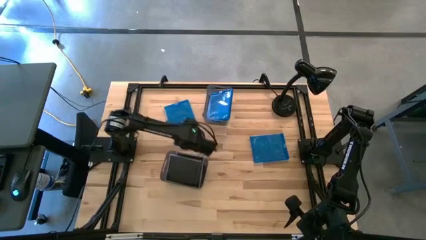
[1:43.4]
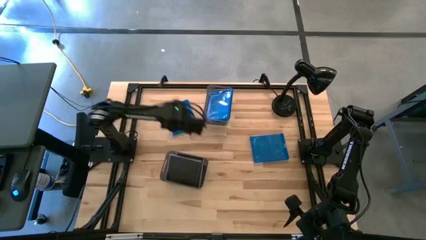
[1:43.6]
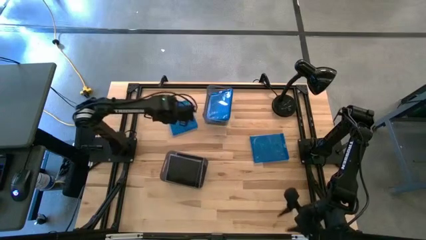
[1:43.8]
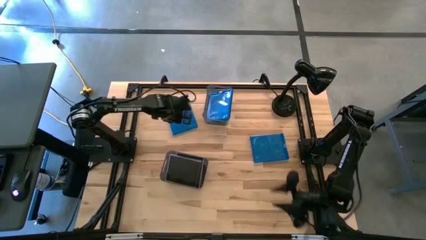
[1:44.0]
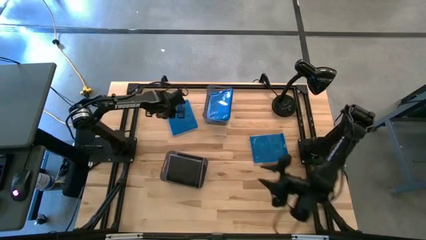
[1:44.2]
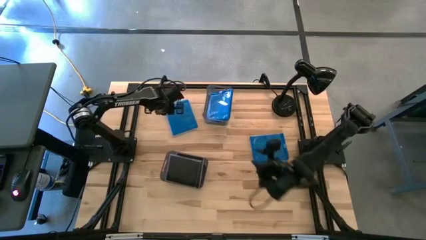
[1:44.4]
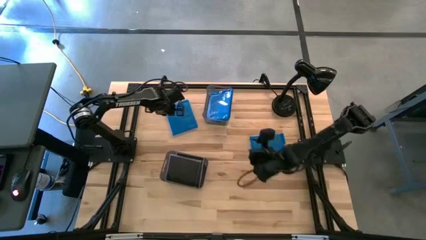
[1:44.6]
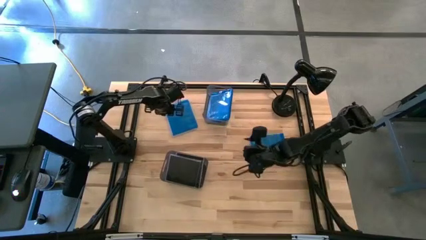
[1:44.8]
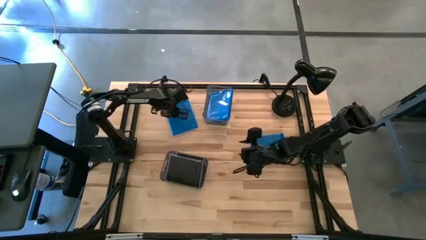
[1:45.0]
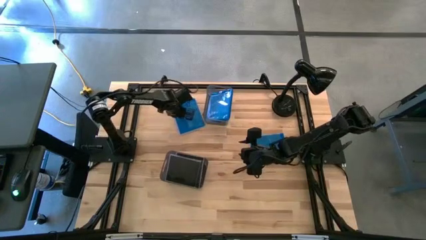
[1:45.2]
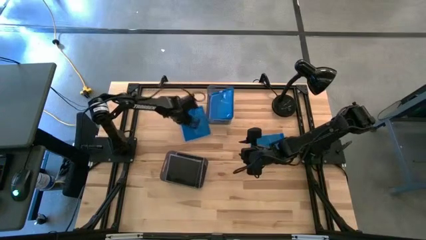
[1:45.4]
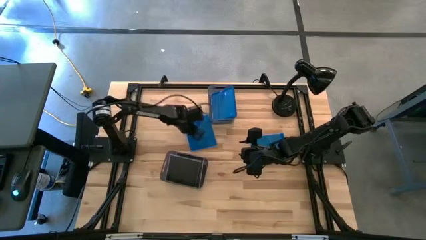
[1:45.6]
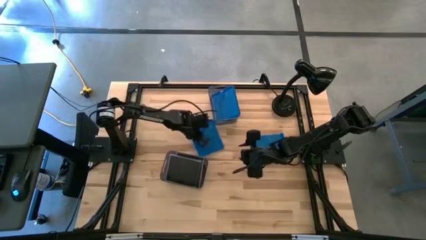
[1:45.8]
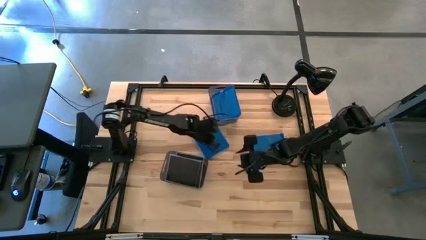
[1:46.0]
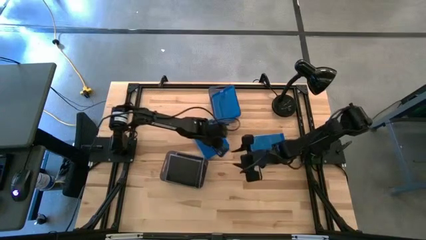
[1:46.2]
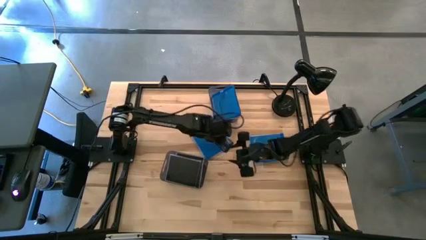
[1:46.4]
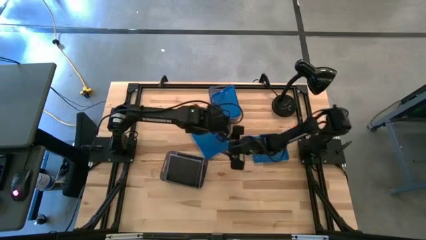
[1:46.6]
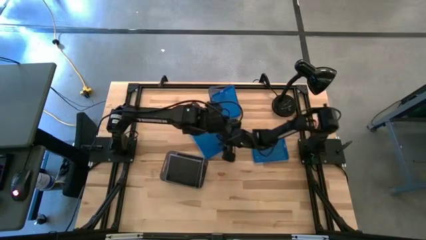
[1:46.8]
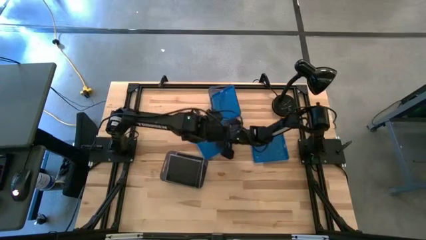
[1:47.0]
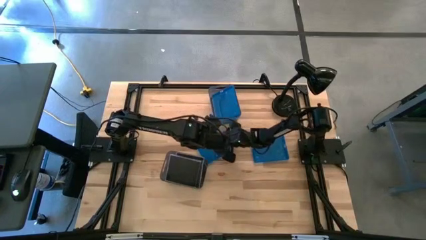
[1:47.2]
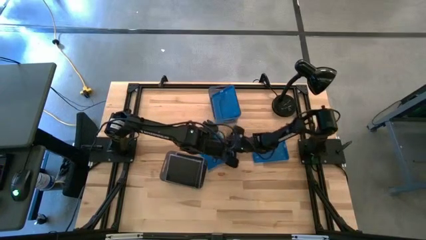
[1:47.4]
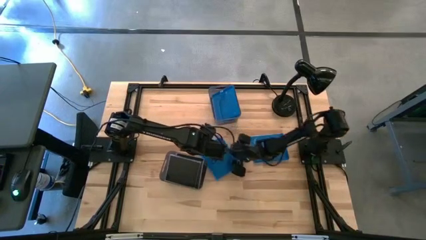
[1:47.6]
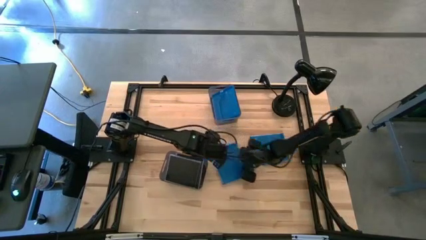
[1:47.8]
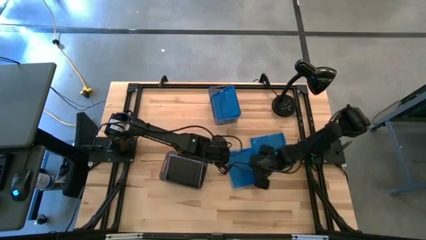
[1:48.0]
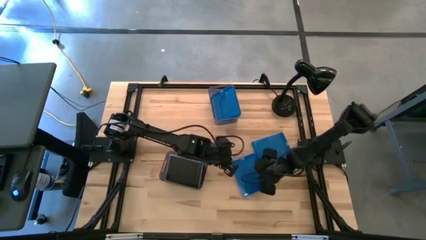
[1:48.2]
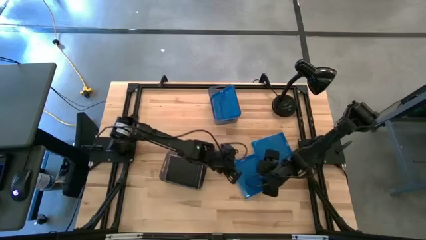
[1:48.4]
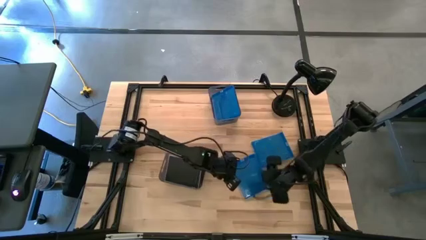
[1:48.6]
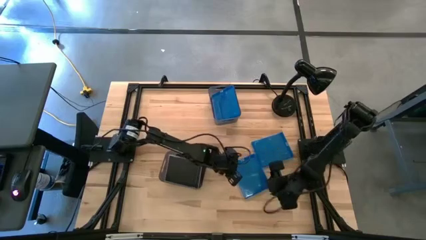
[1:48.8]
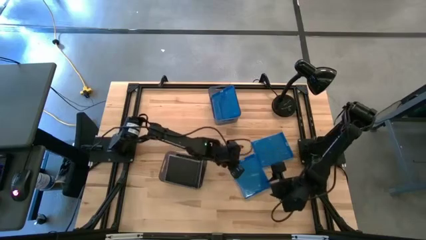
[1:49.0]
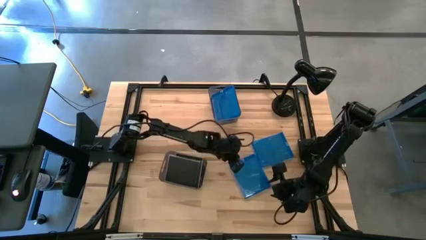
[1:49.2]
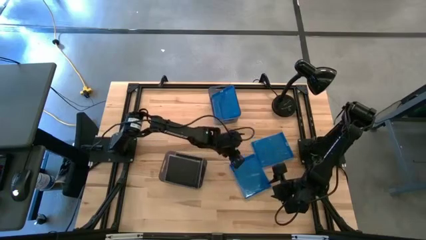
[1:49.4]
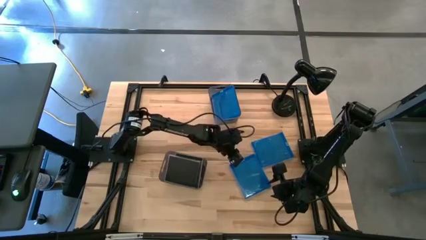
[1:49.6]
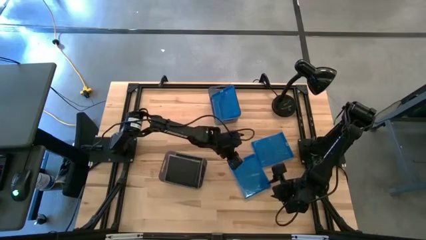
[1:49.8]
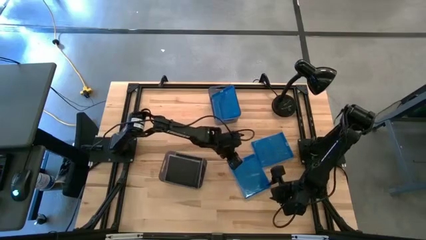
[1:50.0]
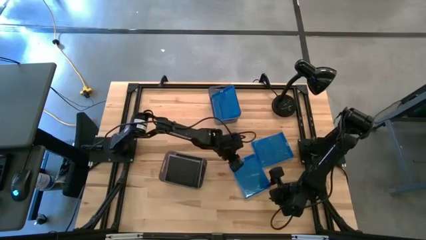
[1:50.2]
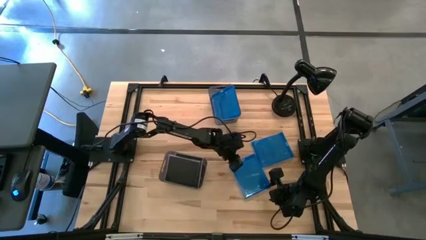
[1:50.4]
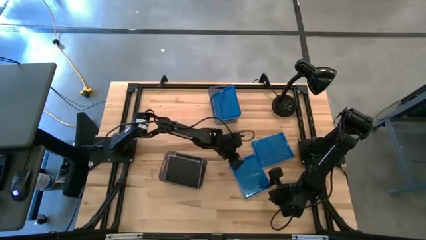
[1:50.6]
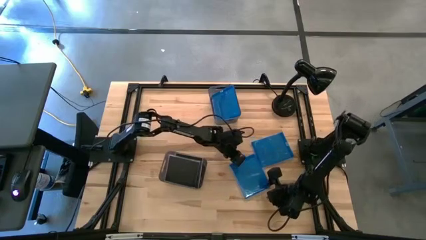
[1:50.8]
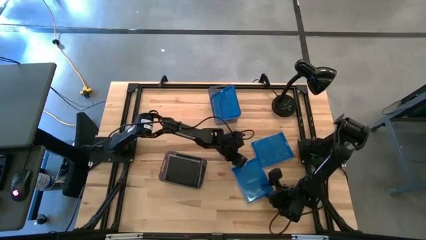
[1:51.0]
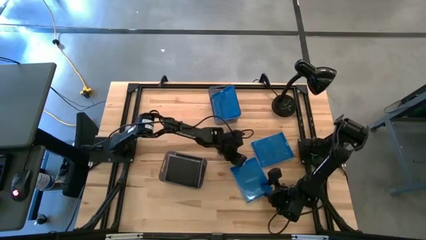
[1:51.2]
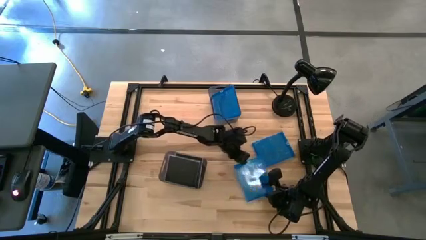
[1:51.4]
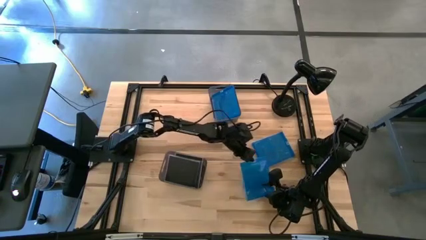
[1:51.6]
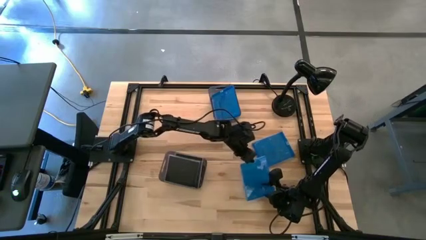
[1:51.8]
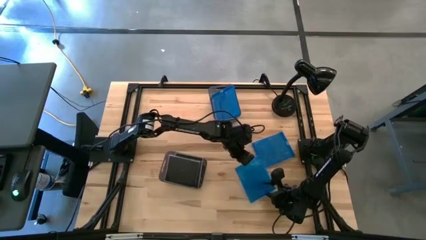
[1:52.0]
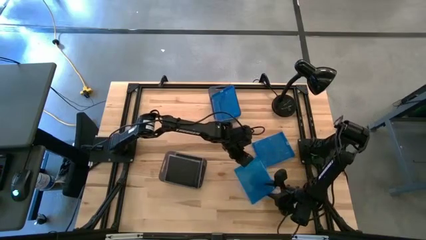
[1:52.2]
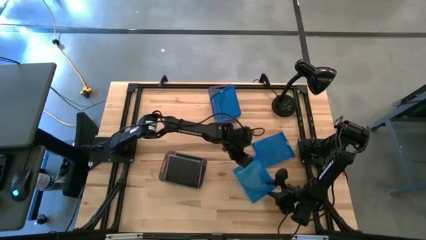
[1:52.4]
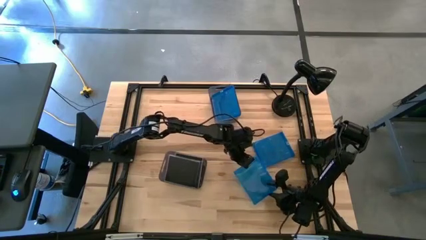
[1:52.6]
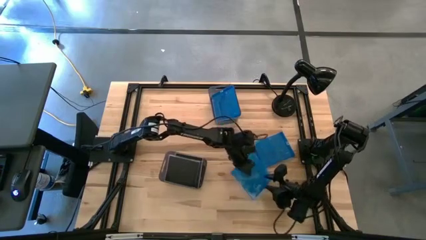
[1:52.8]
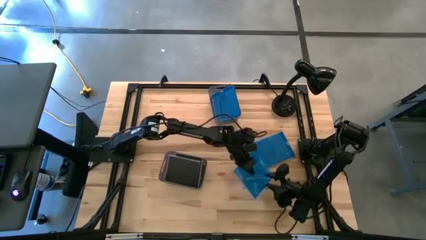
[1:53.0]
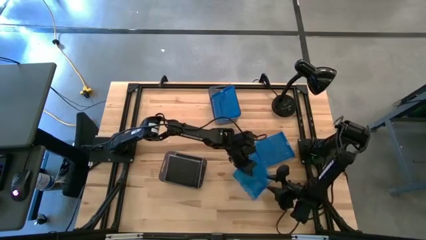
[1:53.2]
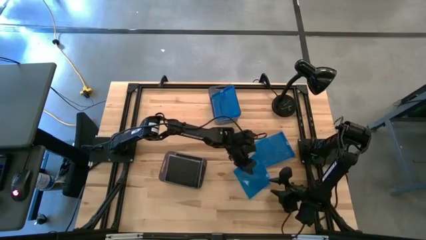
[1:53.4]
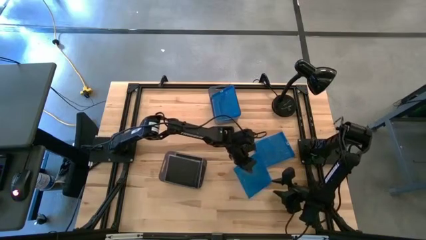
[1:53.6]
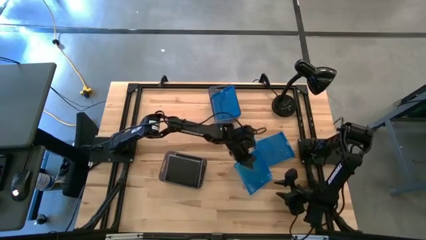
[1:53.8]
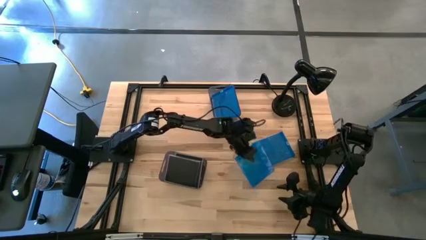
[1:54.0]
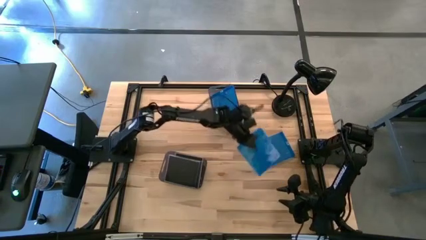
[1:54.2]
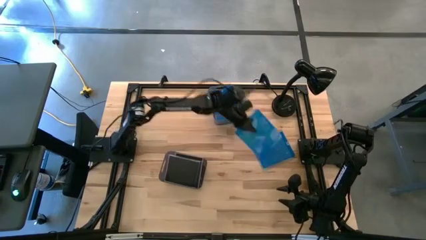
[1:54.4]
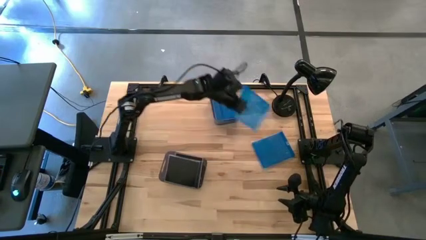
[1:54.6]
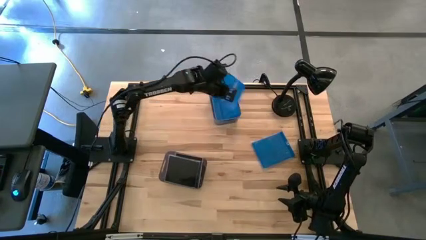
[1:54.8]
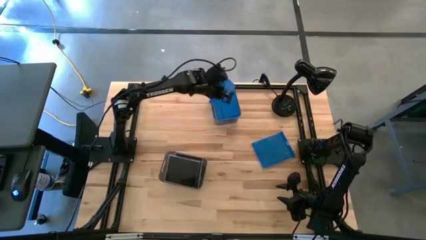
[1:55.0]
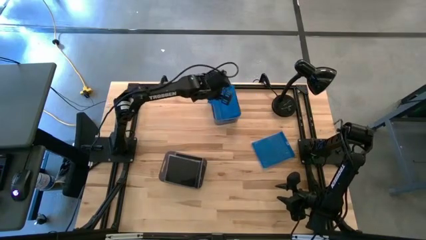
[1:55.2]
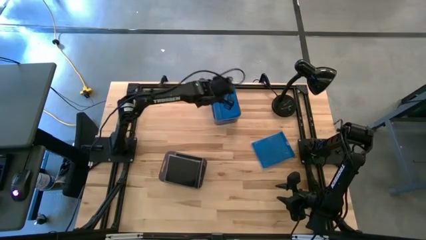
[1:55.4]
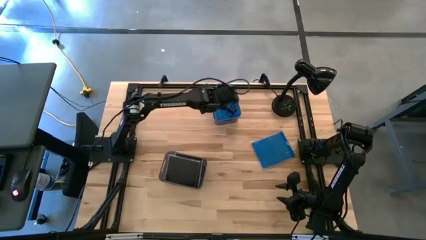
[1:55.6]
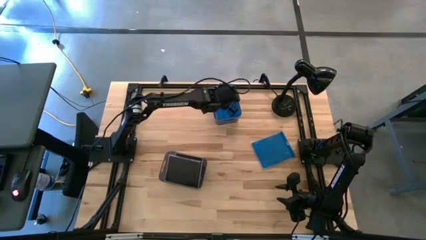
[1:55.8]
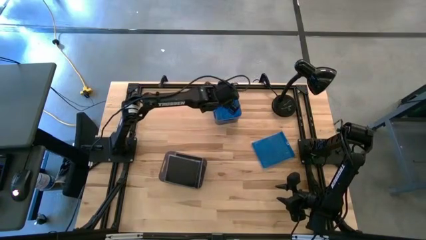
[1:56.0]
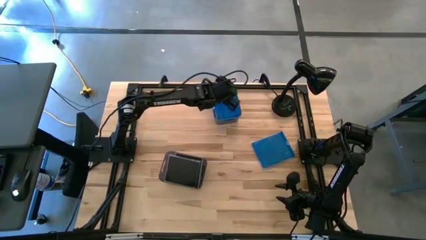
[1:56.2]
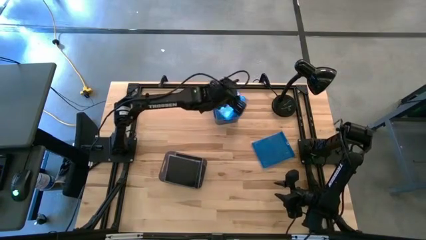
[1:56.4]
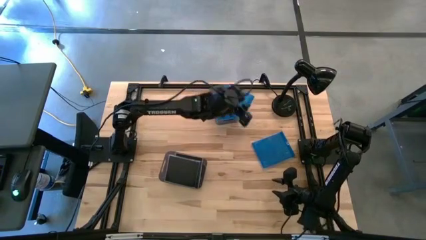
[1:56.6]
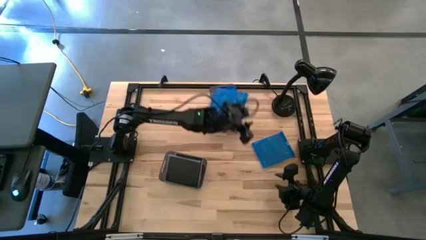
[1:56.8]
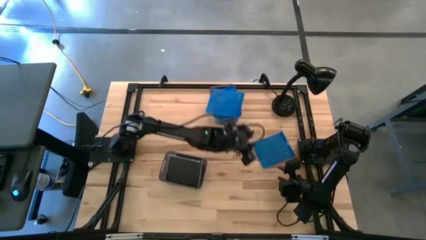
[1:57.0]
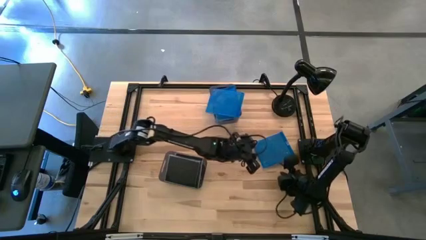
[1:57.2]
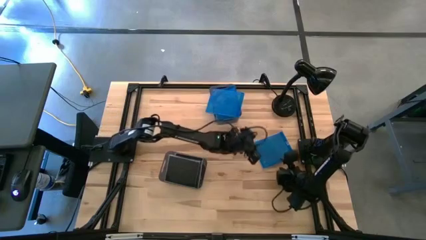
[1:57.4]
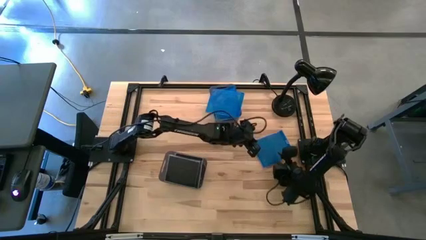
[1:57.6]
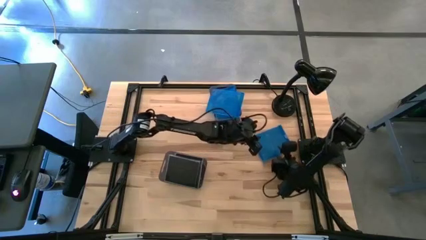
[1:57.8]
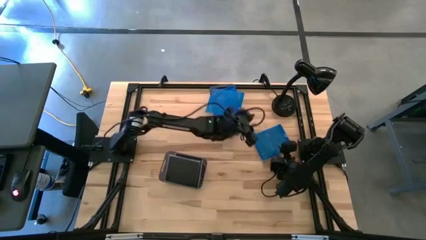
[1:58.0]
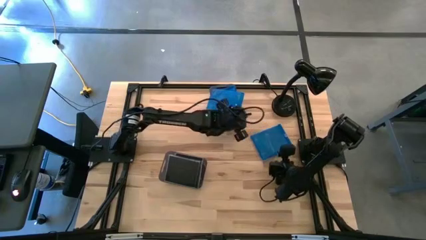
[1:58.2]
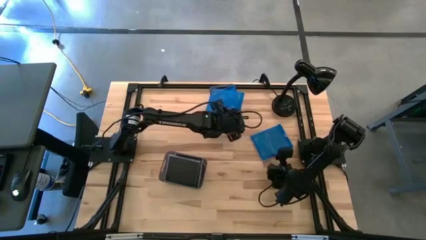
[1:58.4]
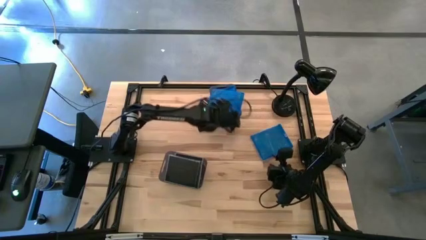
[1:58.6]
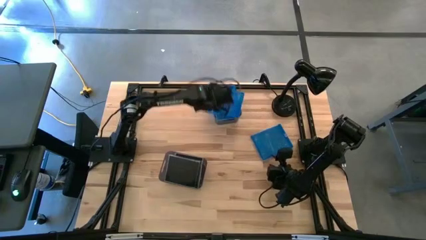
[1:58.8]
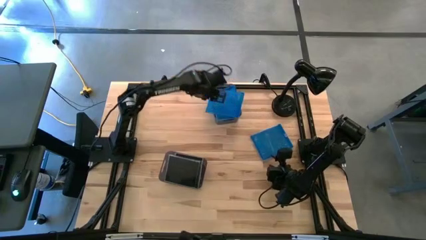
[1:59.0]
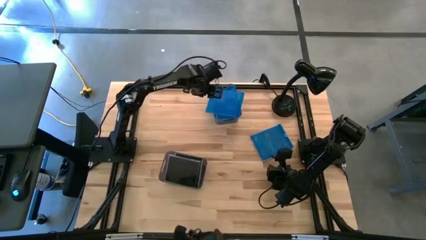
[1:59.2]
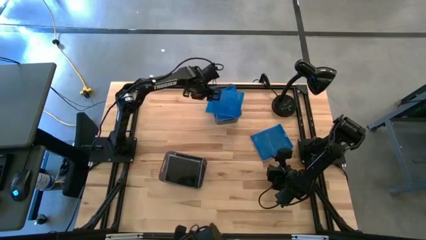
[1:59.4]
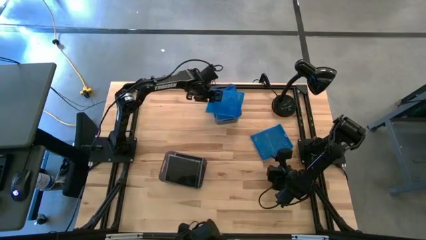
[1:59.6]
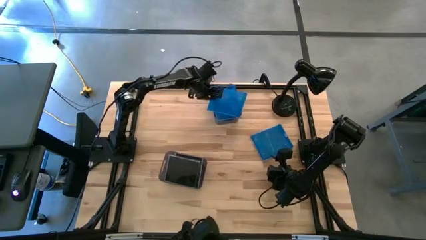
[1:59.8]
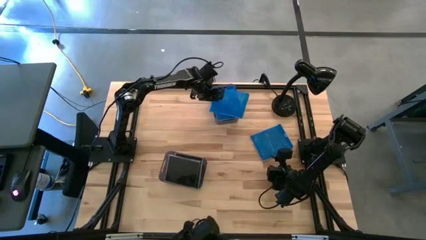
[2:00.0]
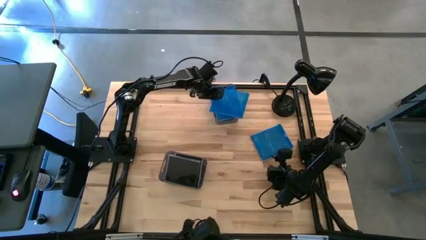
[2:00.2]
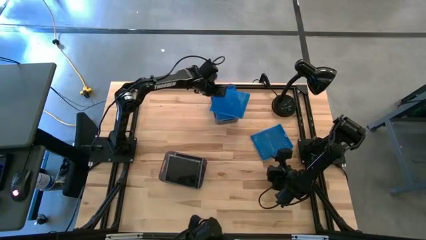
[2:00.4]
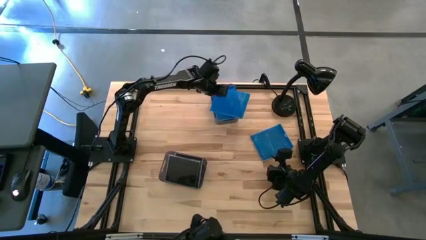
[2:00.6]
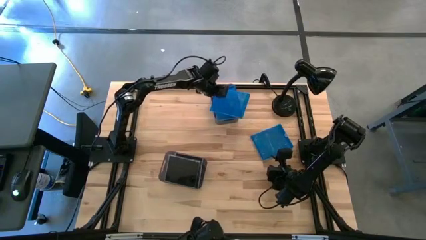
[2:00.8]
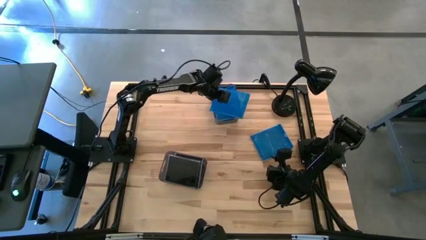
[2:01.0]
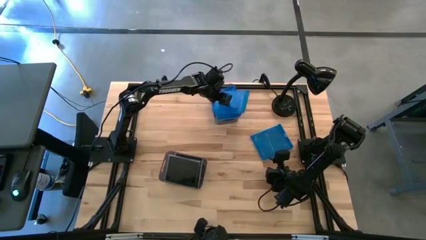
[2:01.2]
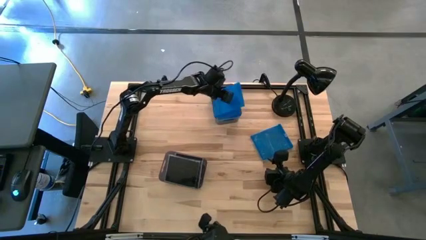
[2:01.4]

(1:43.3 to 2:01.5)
Task: Pick & place jewel cases by type
Put the top left blue CD case into the top black bin
